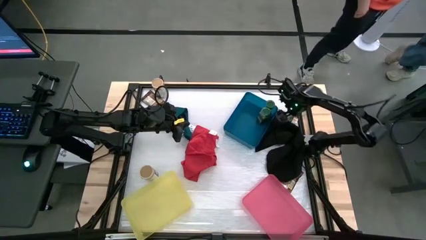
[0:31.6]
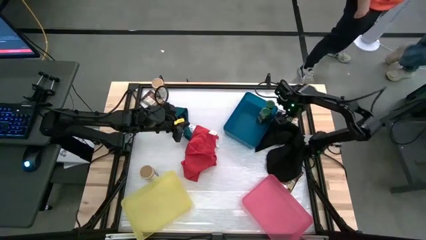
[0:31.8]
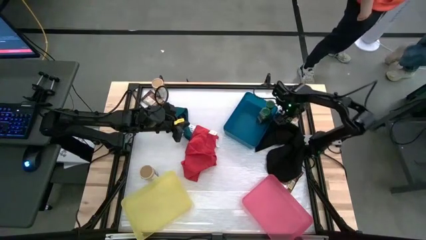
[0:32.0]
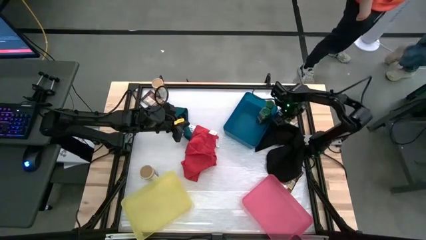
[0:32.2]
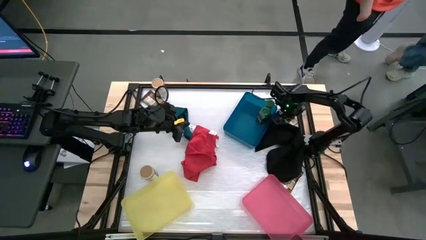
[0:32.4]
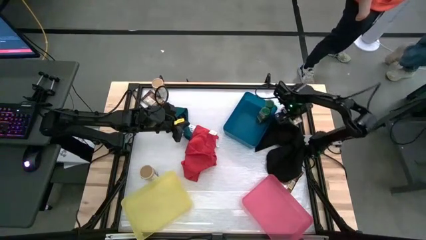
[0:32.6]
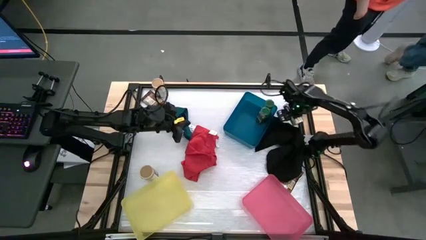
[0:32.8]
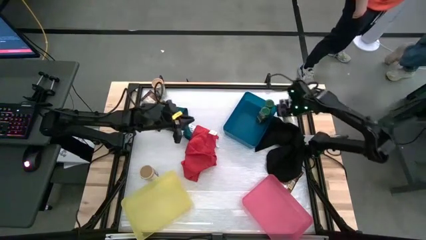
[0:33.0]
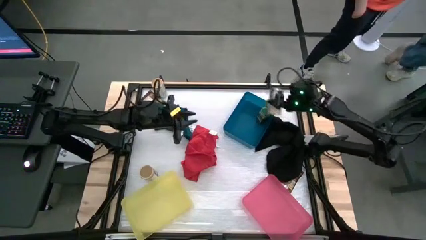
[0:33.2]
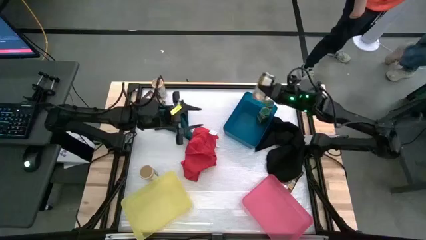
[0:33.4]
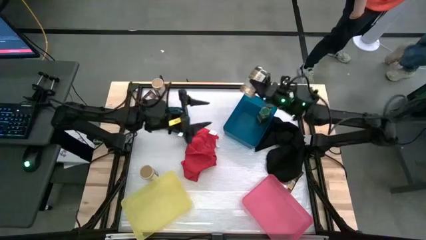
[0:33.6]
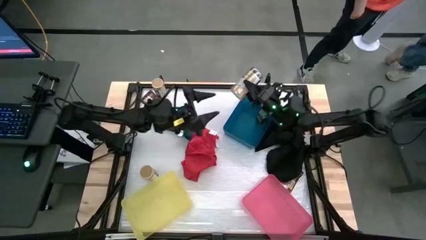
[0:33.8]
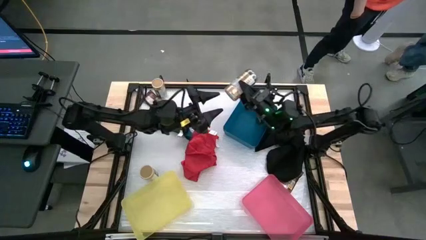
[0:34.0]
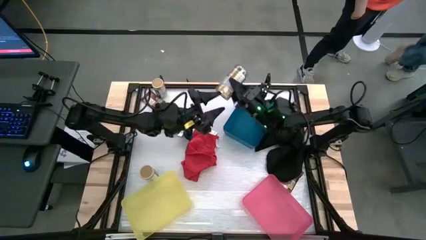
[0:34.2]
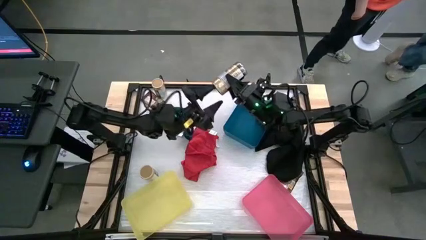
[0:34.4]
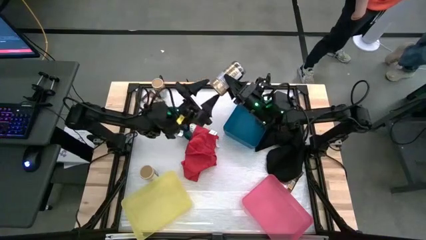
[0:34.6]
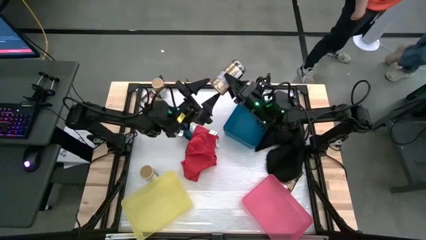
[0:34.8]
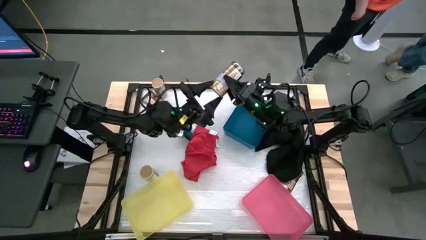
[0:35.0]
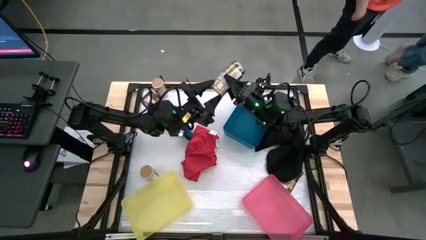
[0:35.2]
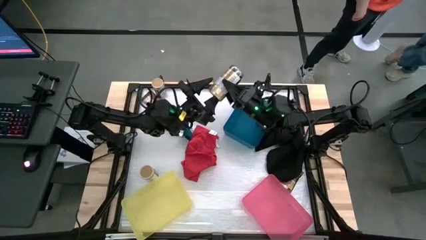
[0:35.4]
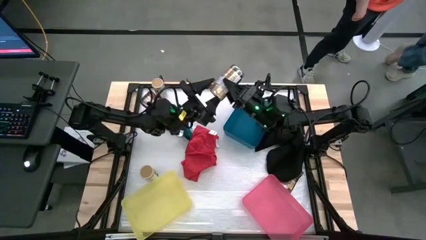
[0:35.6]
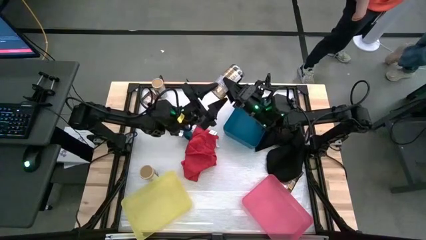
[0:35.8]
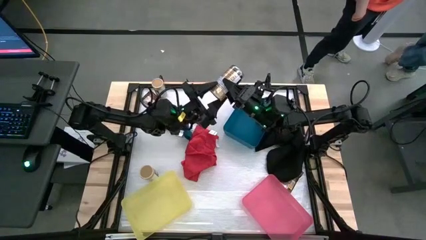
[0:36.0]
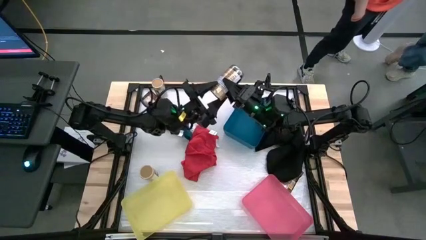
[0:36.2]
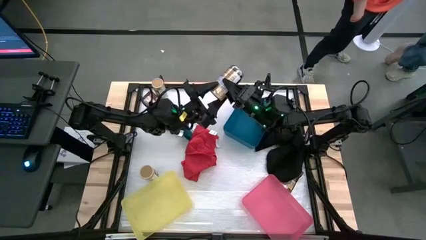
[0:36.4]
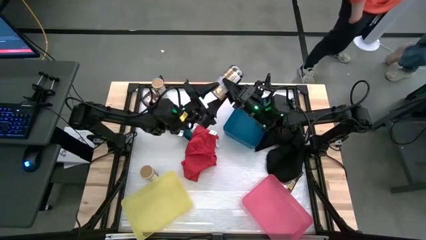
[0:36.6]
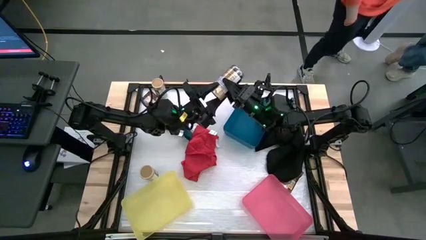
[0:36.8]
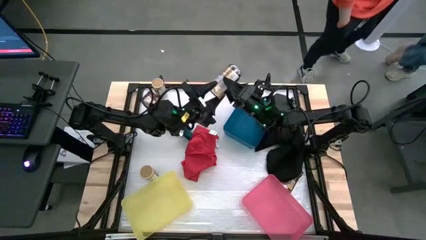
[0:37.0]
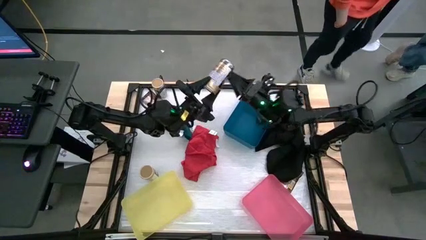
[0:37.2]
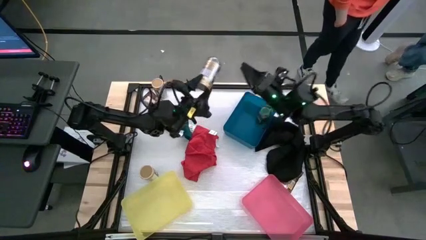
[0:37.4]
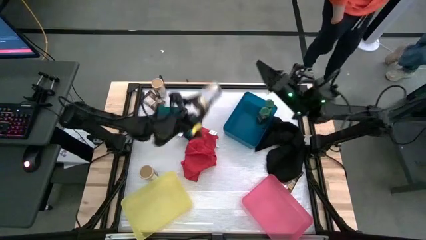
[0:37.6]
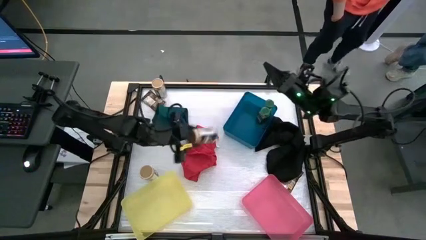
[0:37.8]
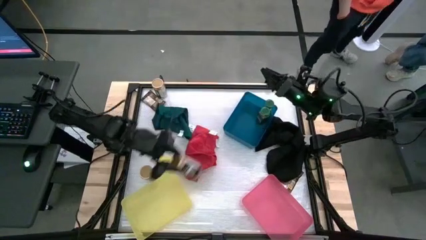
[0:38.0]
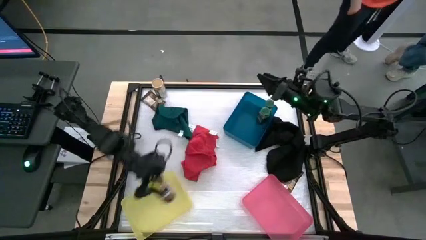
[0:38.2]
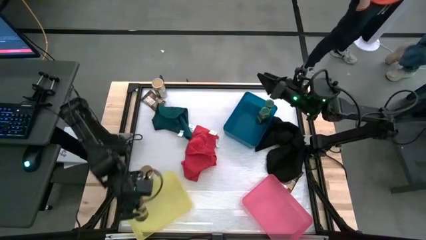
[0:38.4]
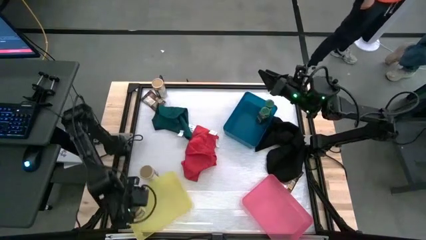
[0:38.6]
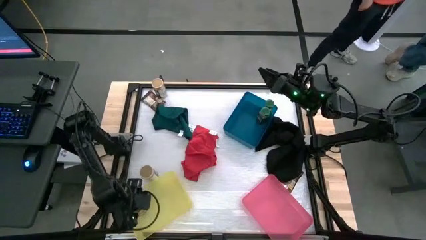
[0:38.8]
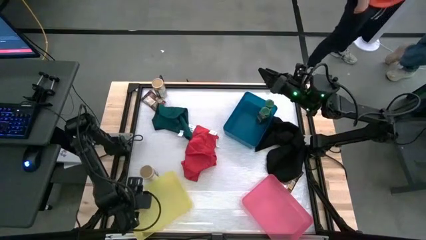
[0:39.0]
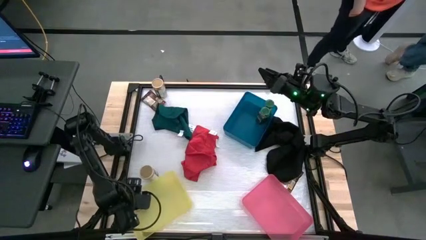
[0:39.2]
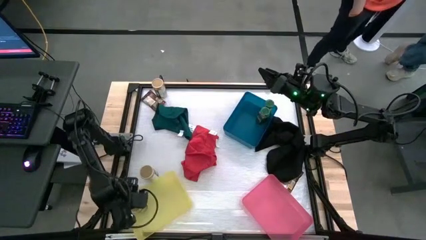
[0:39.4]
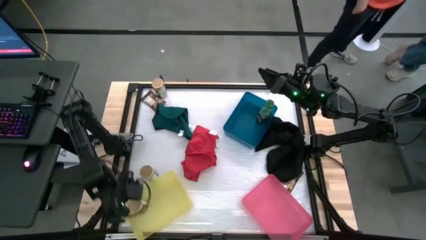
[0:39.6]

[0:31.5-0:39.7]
Task: Sort spices by type
Put the middle right gold seasoning bottle into the yellow bin

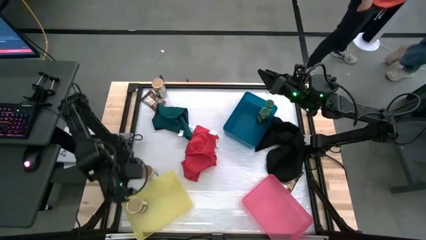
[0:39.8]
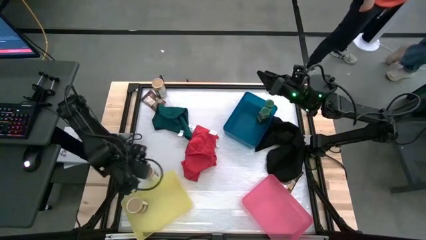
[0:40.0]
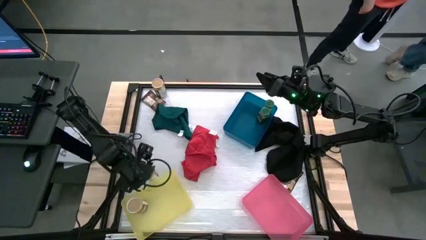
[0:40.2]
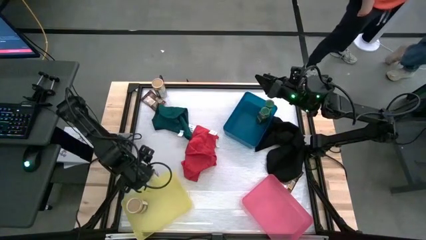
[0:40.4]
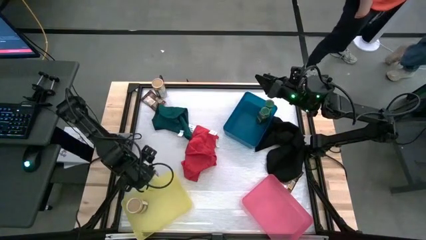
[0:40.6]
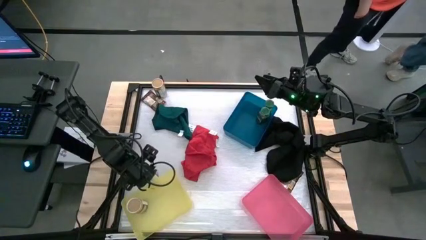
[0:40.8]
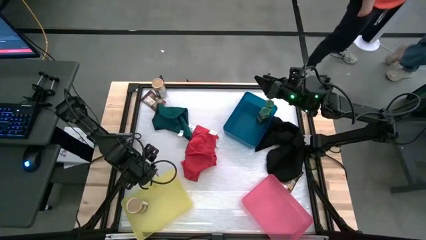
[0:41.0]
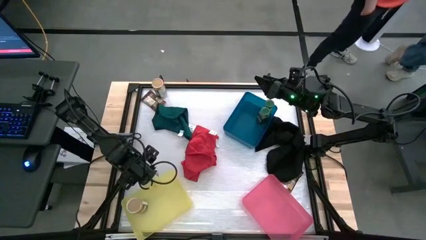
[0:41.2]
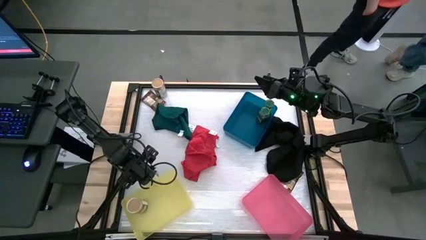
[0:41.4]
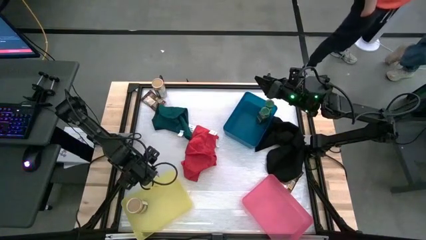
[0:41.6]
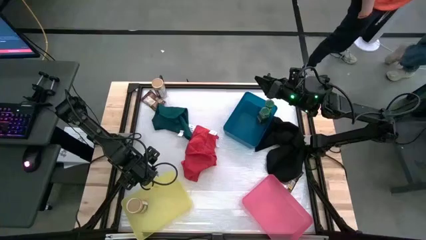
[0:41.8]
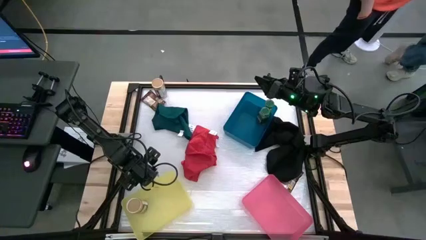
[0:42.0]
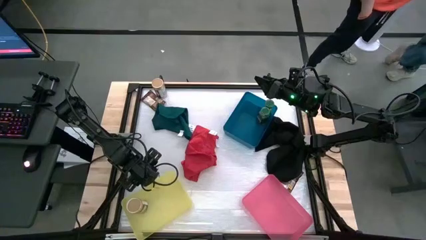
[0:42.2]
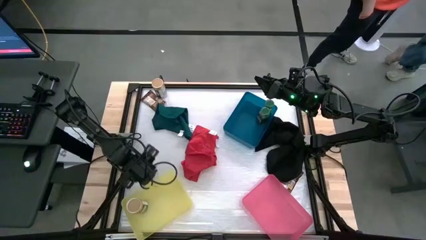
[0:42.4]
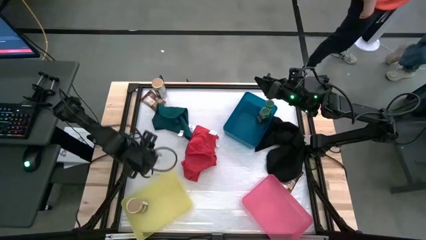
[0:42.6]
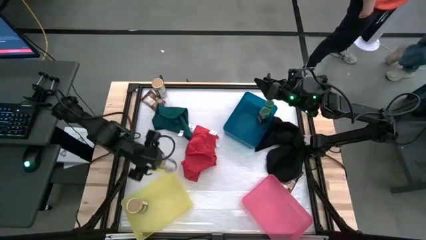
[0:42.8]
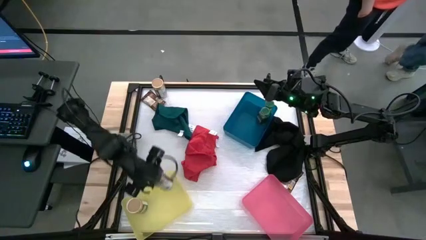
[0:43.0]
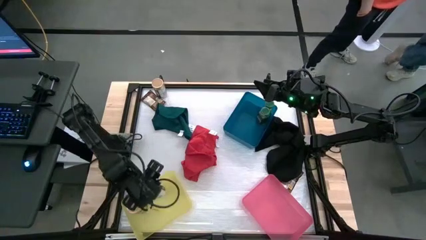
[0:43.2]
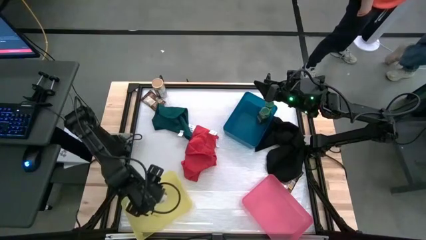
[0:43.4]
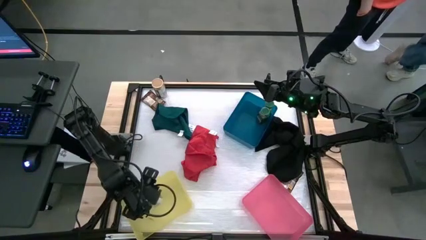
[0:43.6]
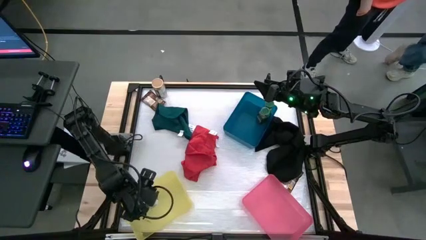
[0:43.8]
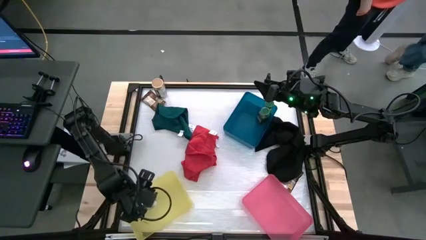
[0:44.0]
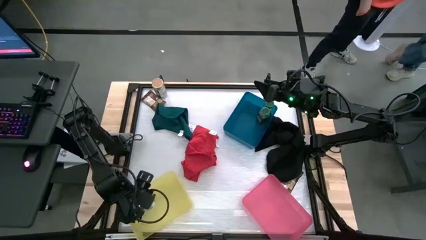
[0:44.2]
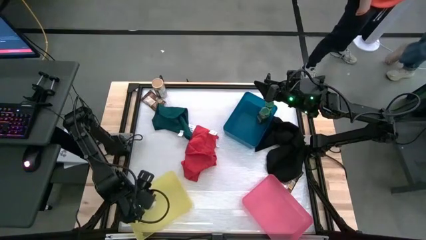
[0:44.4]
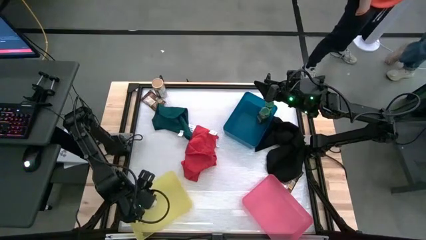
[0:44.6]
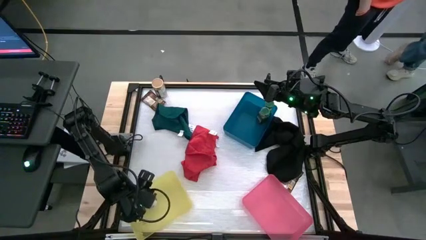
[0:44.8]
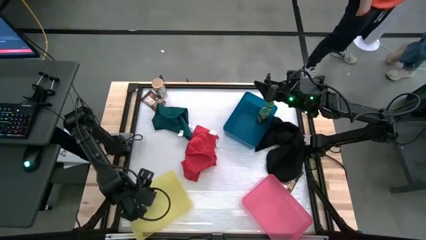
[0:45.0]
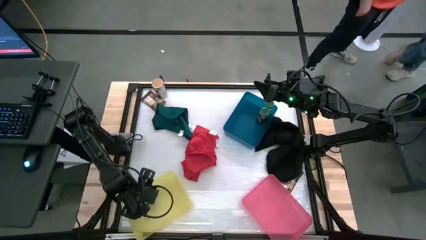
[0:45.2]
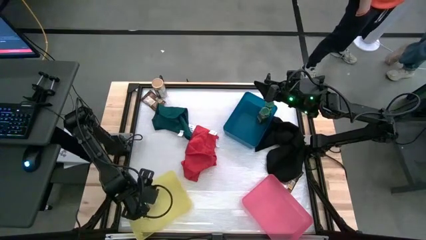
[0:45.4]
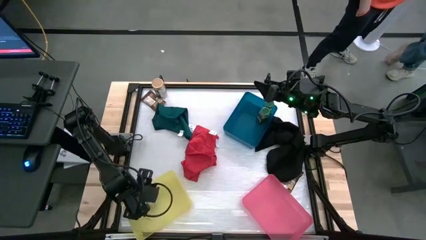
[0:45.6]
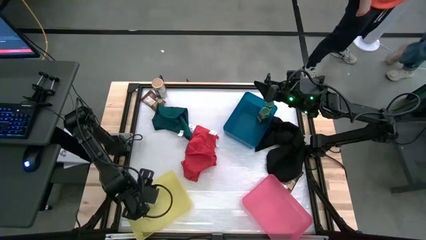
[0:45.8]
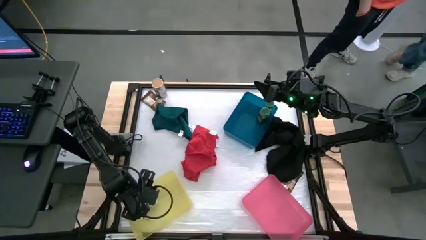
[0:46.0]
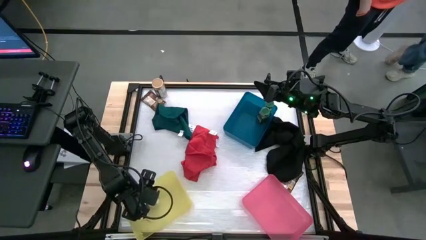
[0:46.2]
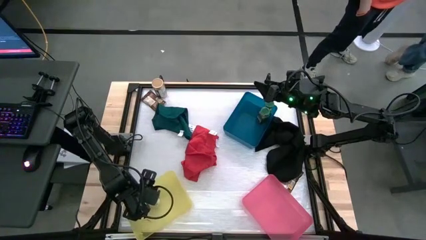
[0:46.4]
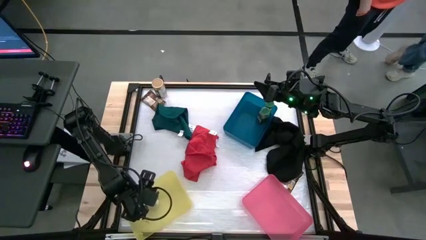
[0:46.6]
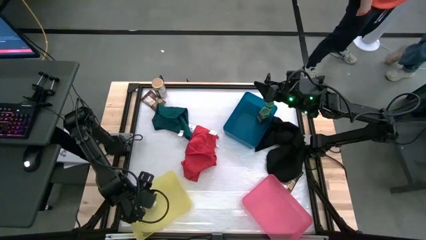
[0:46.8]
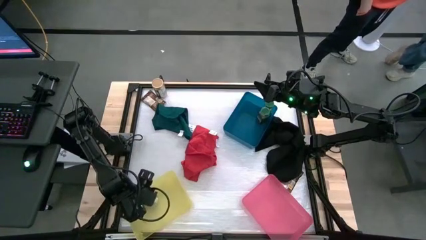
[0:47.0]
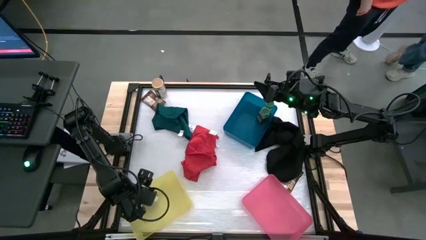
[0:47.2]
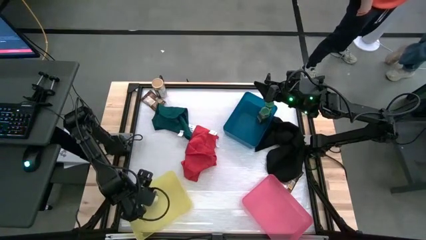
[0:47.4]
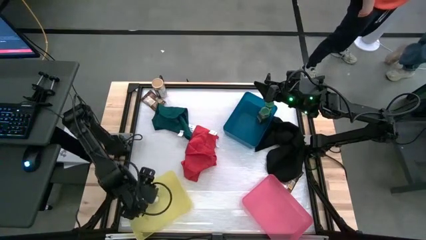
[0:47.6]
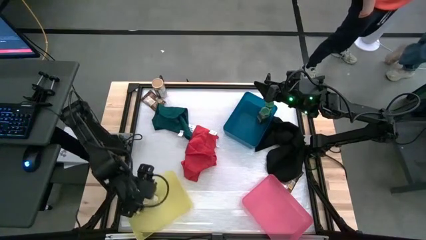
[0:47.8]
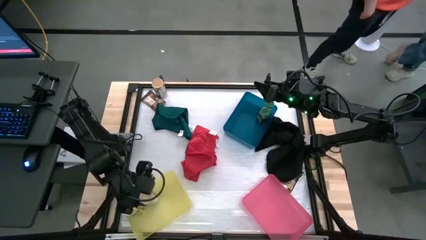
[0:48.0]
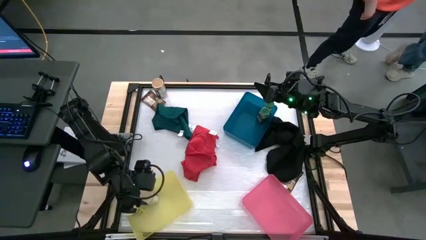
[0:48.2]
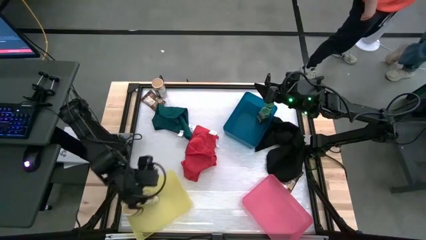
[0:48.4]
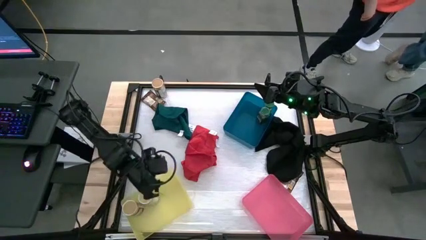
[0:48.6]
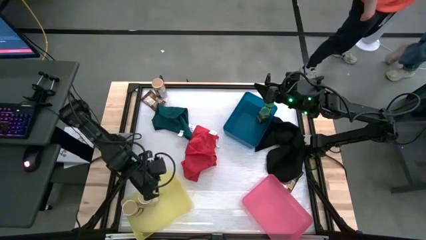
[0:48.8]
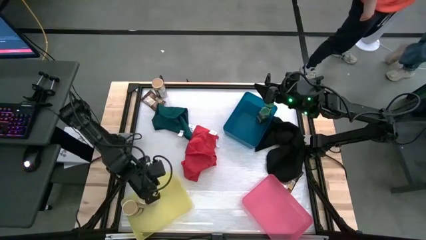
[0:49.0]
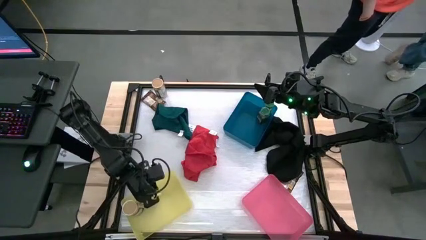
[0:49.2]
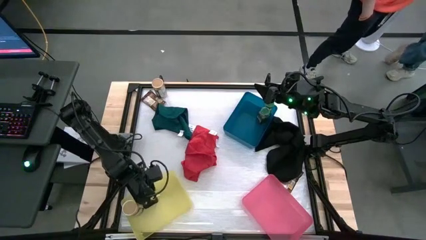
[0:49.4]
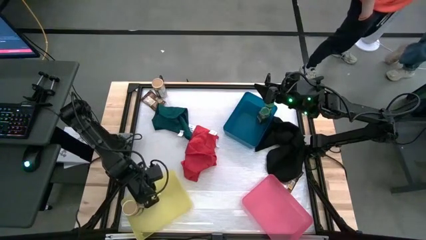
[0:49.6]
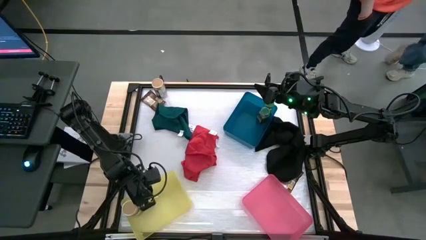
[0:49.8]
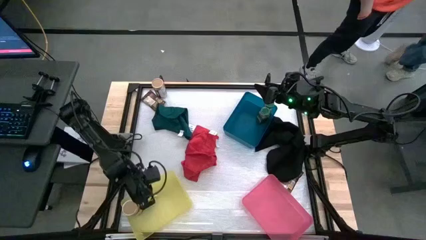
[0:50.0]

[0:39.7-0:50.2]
Put the bottom gold seasoning bottle into the yellow bin
